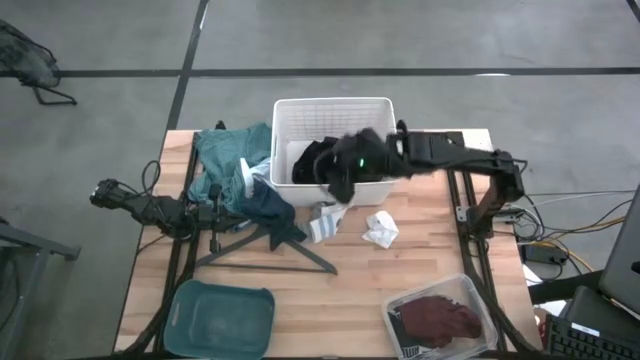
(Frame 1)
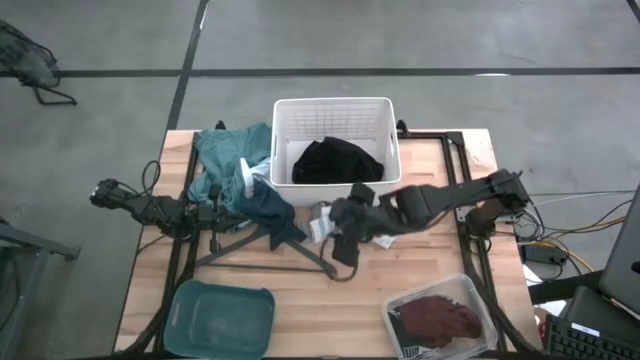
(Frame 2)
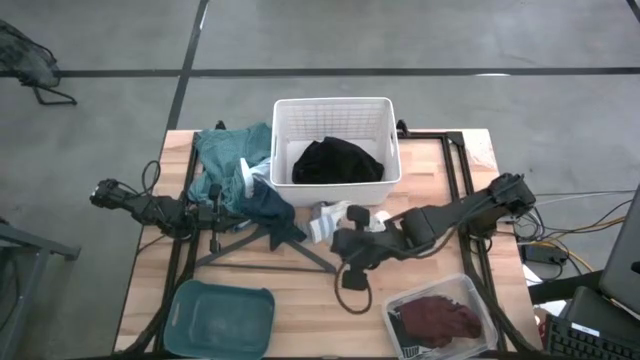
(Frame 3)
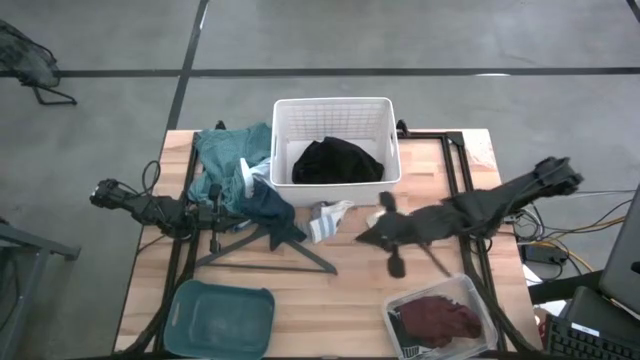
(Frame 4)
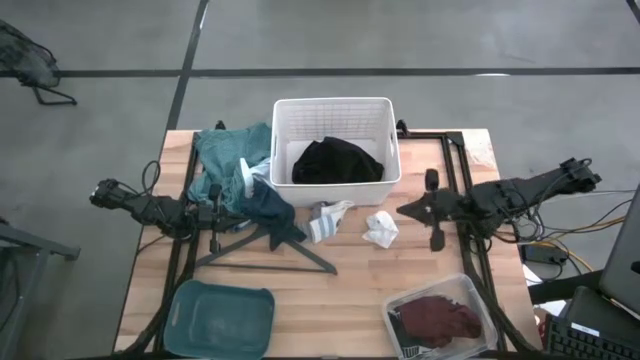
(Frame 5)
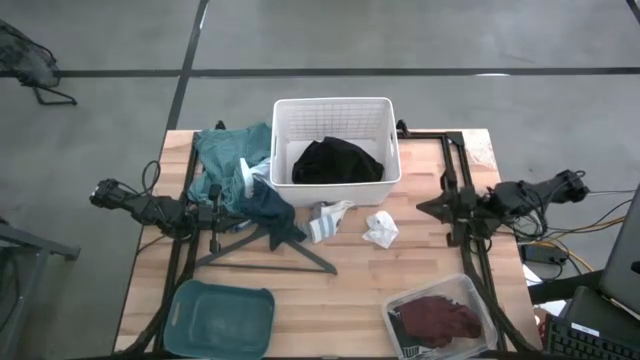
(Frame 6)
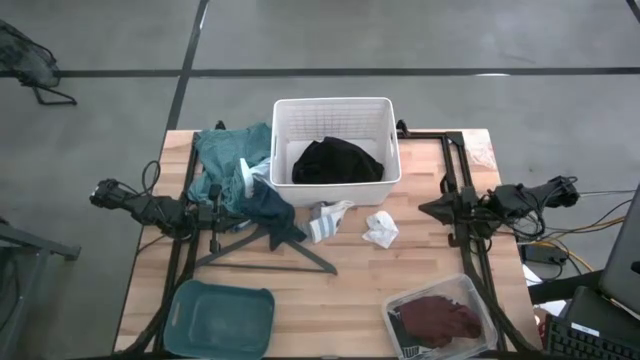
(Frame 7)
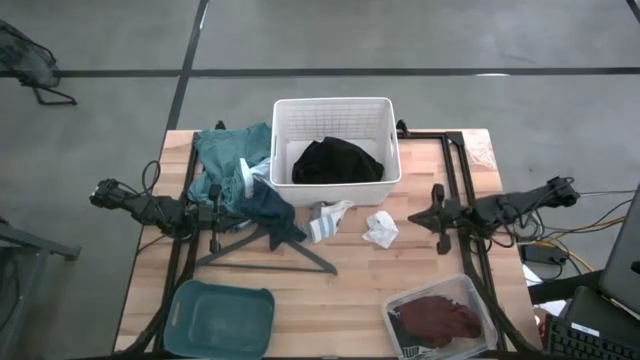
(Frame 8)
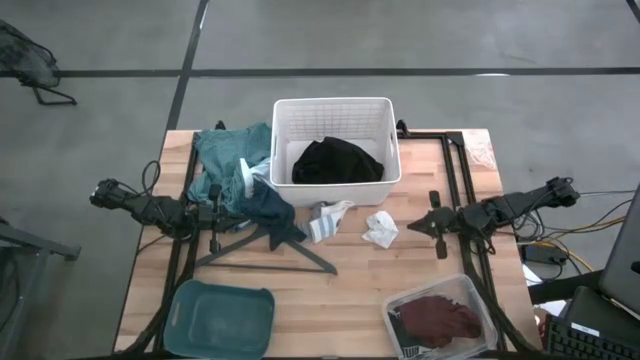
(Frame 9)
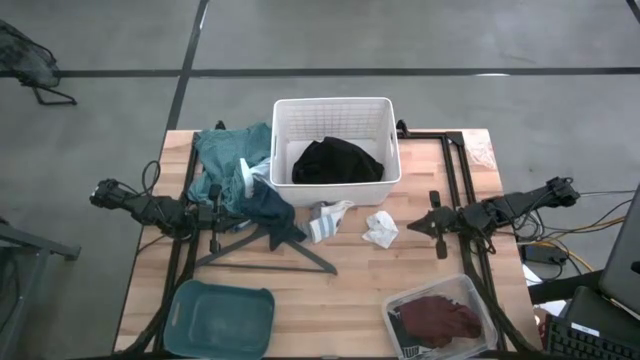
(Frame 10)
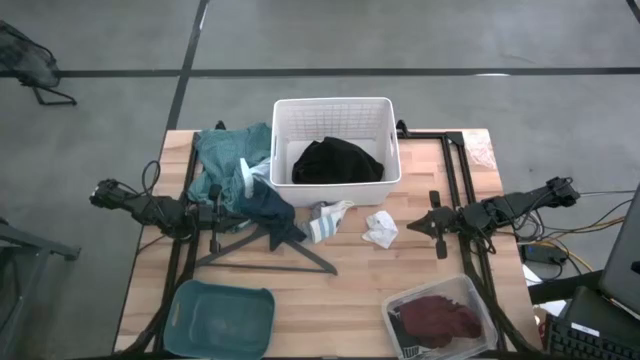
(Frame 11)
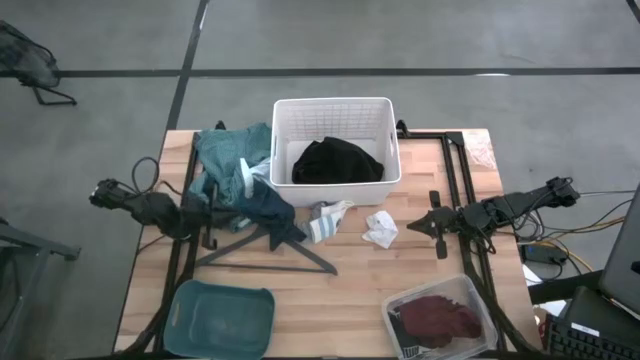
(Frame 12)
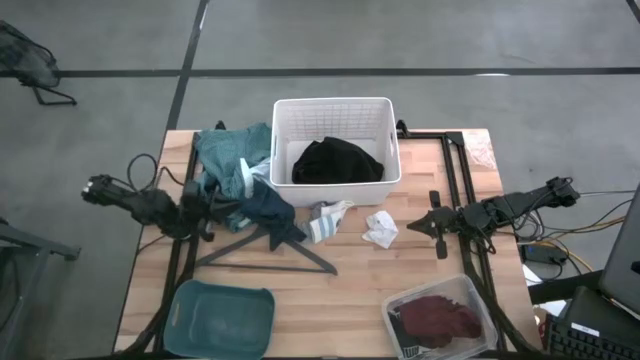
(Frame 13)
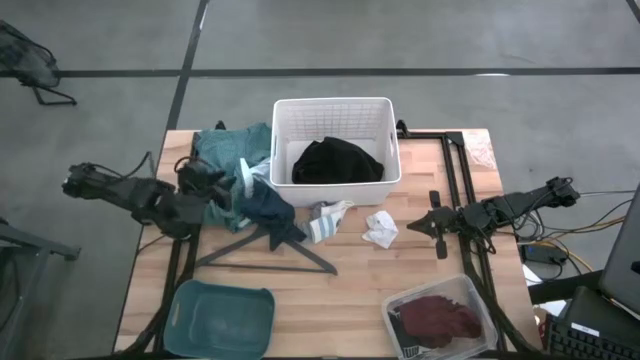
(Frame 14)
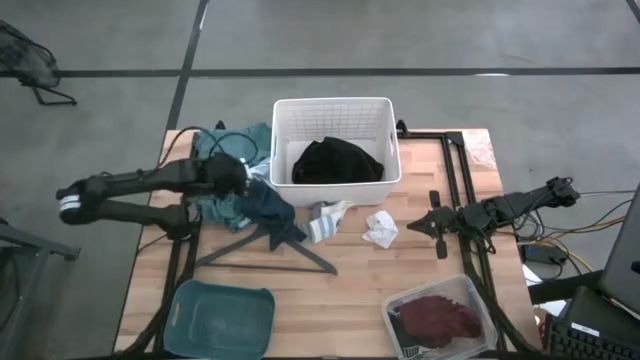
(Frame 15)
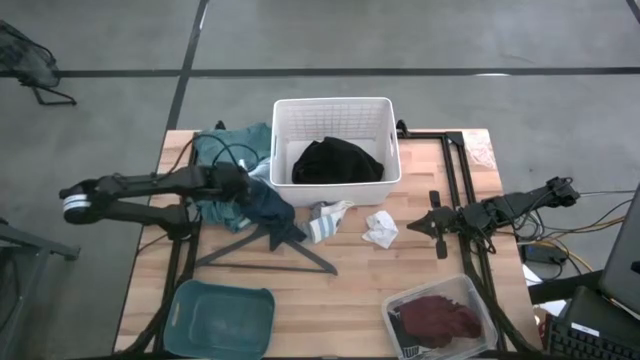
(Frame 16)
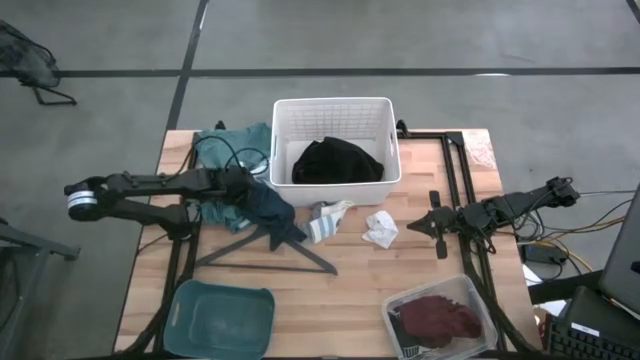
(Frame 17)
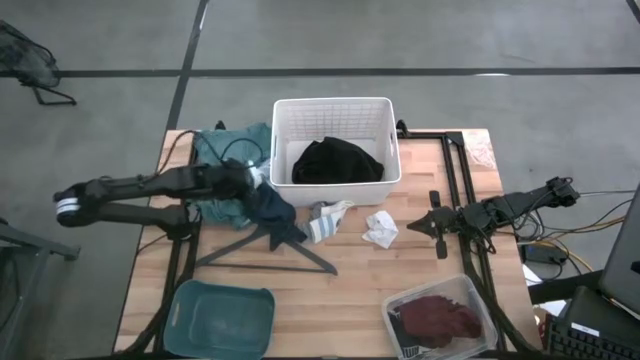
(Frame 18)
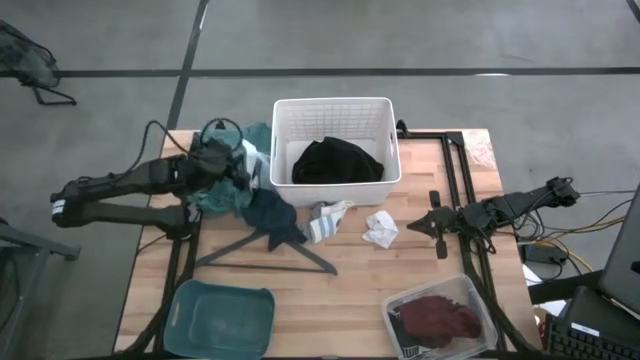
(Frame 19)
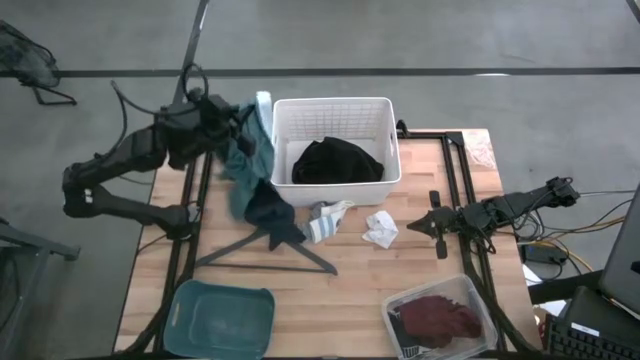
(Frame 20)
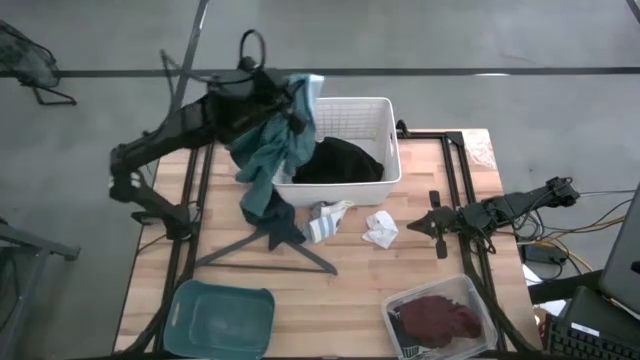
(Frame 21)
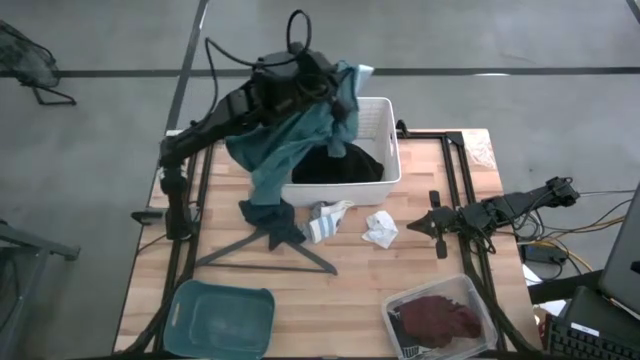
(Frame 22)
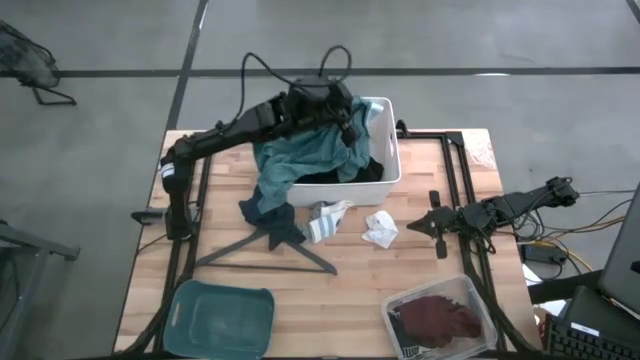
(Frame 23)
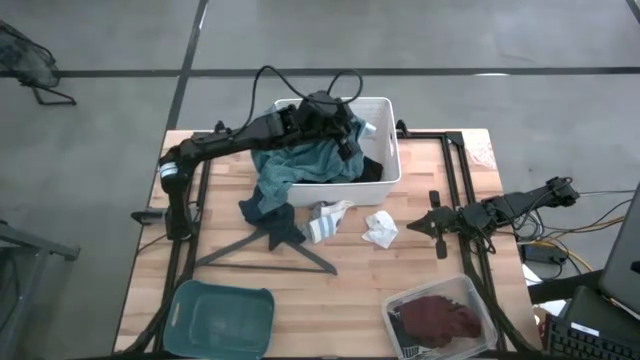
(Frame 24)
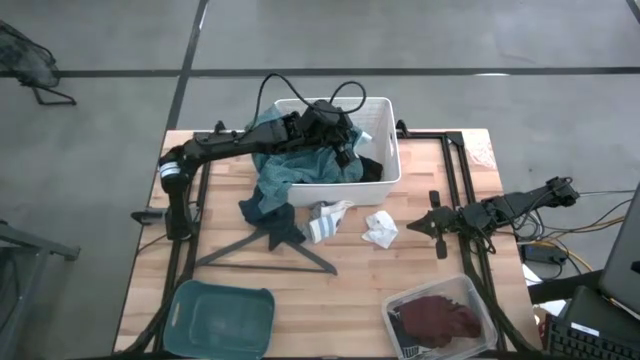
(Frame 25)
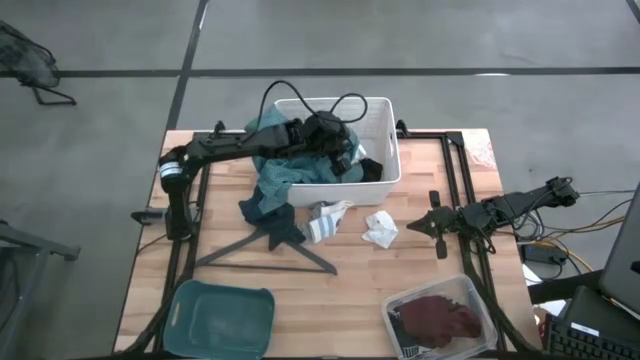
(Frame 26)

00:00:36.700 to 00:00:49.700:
Task: Pick & Place Cloths
Put the blue polo into the white laundry bin

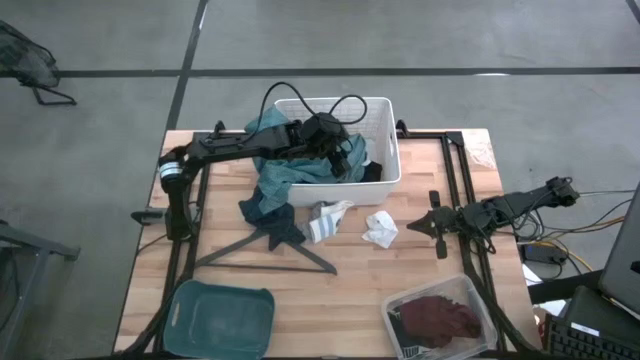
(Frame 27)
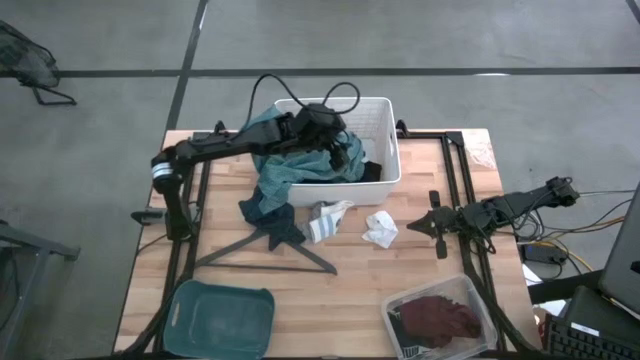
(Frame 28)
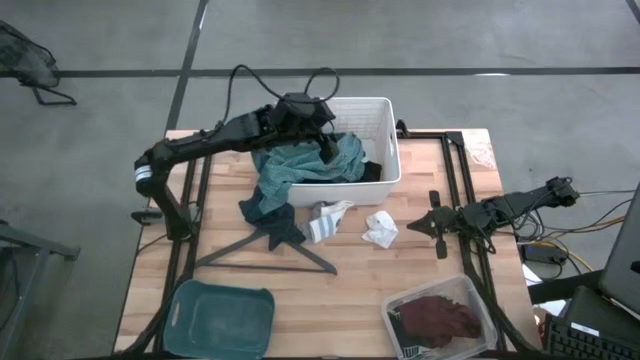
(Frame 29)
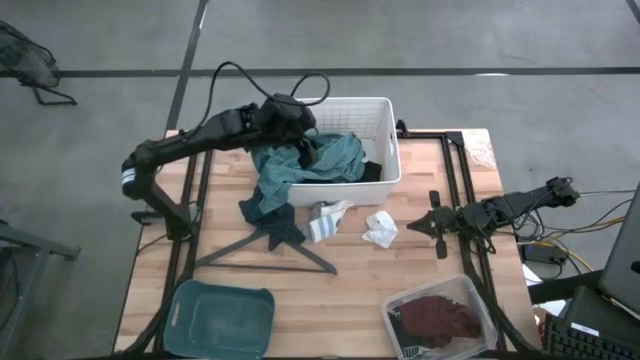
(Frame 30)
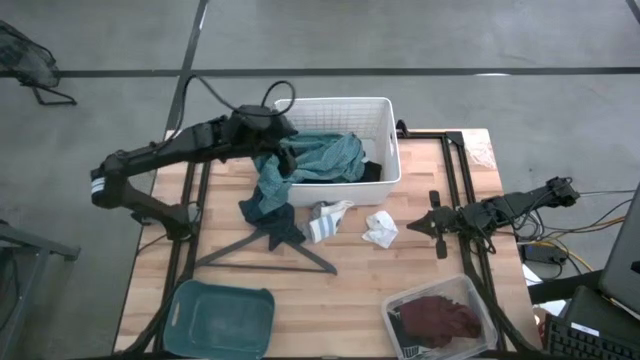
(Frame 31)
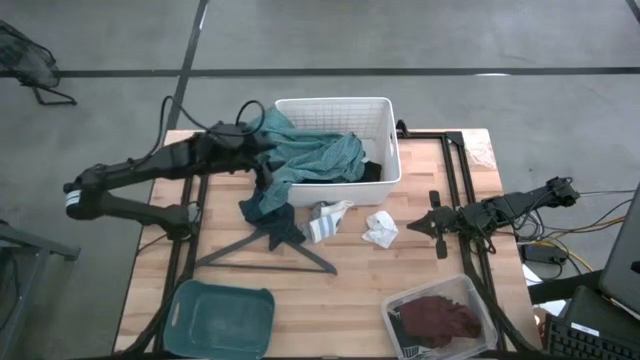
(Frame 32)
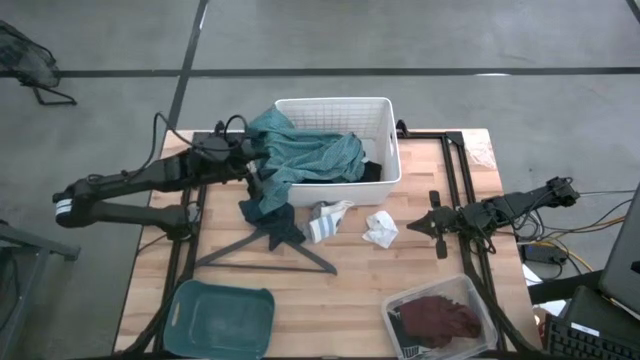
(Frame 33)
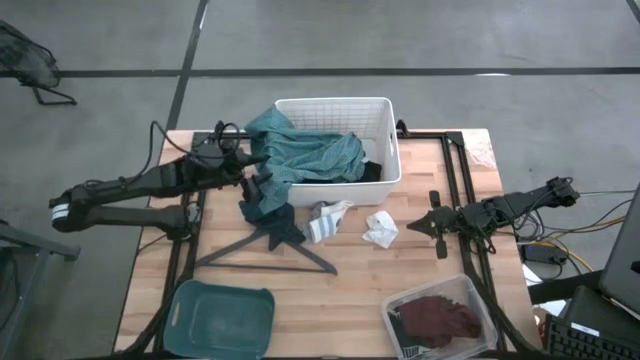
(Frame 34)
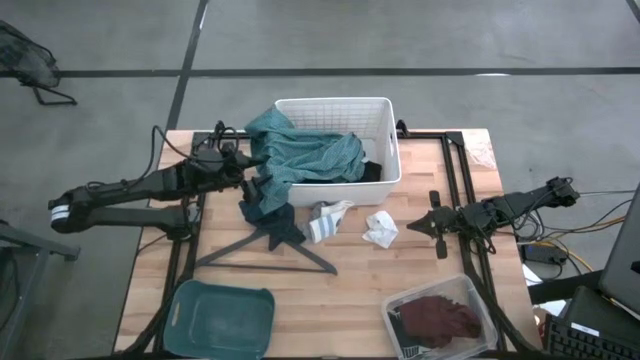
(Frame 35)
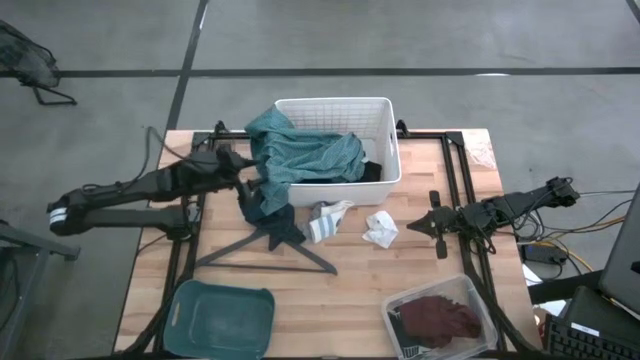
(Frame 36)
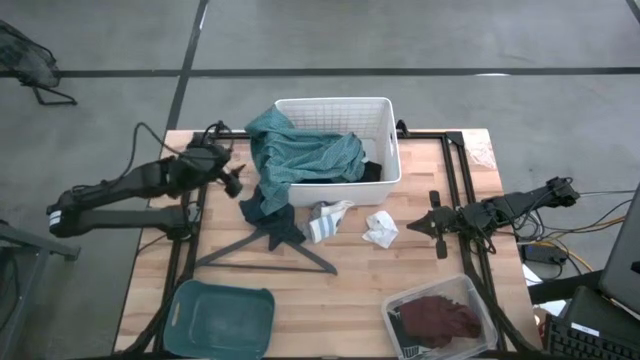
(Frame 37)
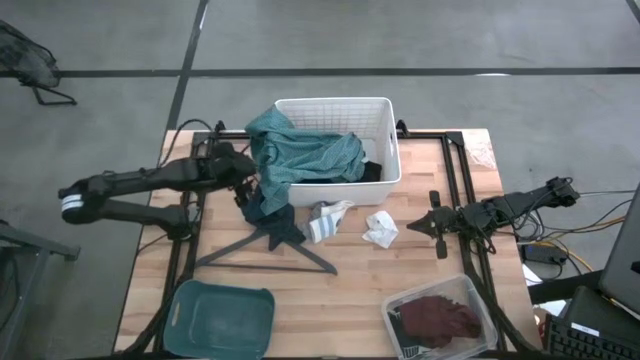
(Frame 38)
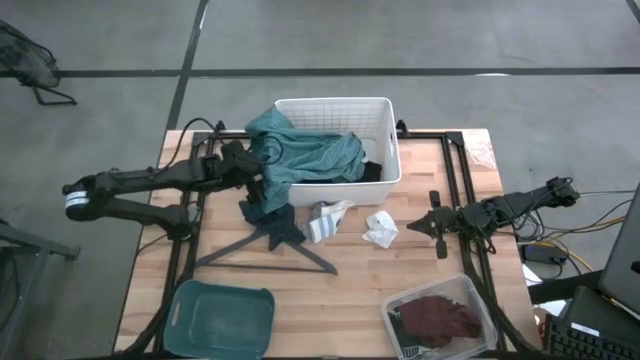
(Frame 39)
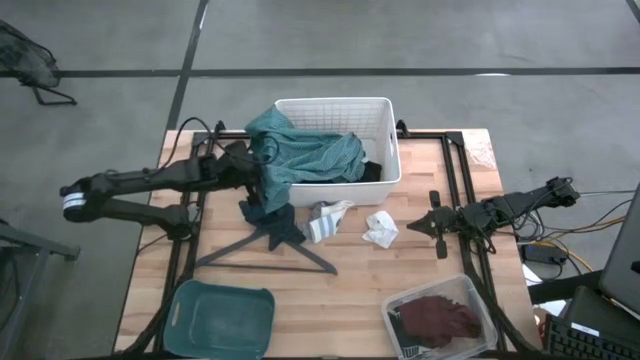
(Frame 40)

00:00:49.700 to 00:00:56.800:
Put the blue polo into the white laundry bin

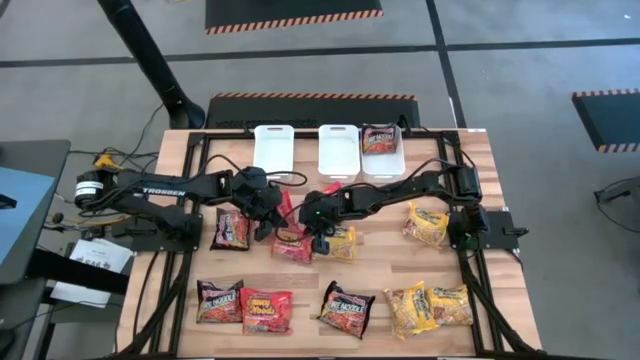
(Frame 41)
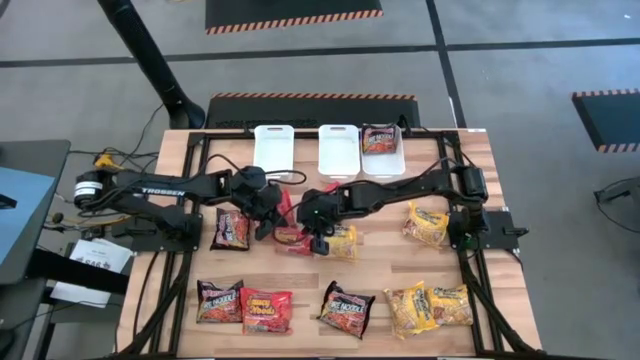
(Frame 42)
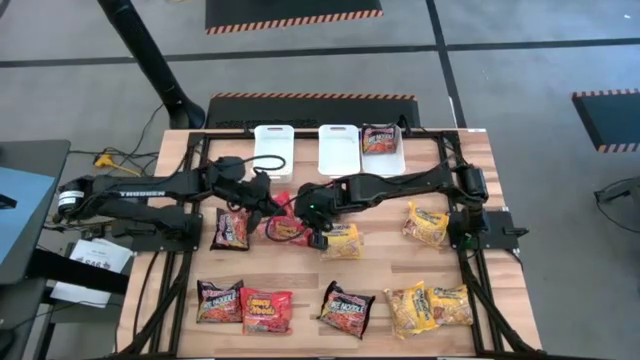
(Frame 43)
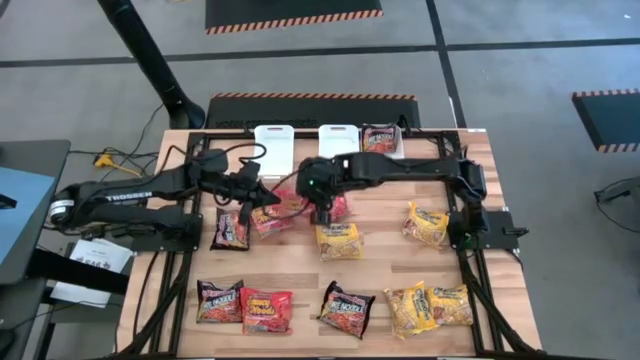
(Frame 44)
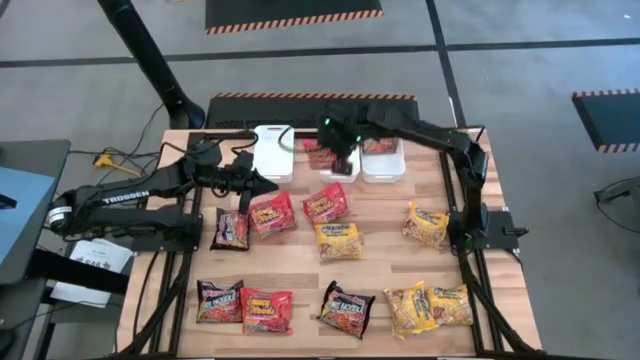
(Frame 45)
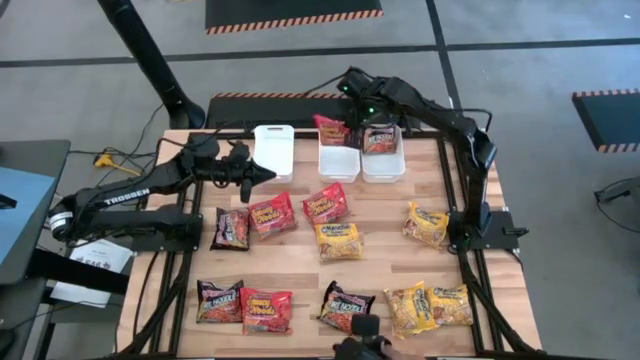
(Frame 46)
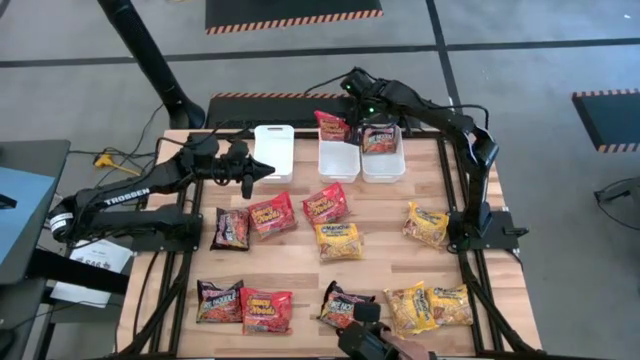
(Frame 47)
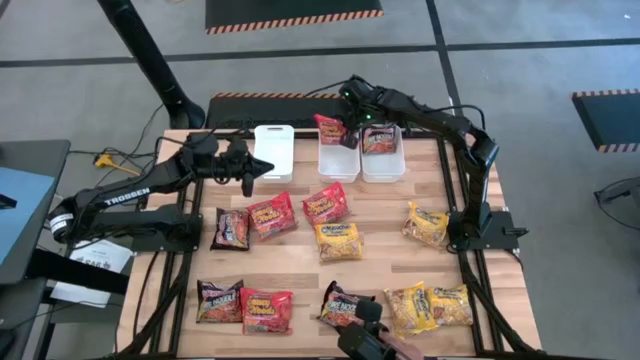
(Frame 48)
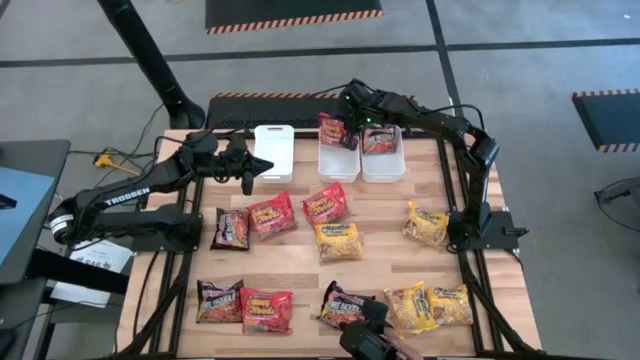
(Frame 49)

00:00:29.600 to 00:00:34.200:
Task: Sort Maruchan noodles
Put the orange noodle pack into the middle white bin
